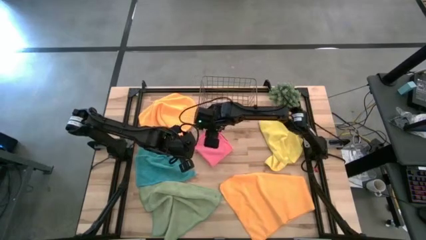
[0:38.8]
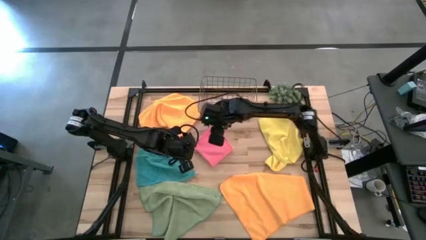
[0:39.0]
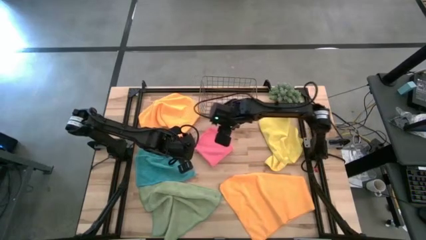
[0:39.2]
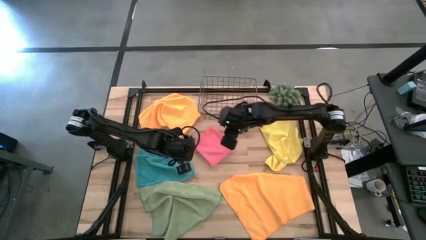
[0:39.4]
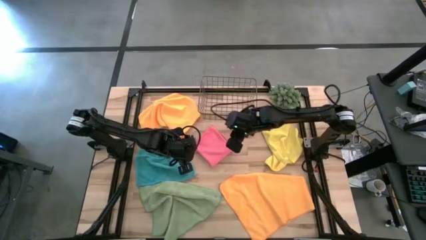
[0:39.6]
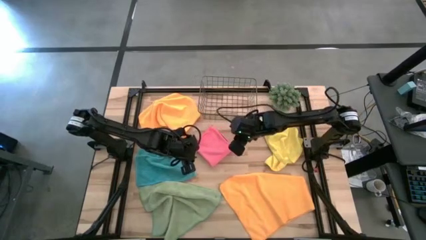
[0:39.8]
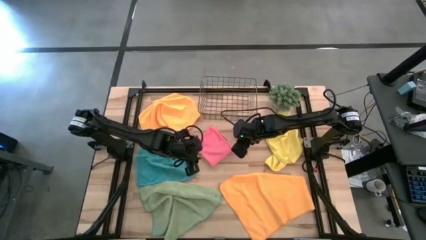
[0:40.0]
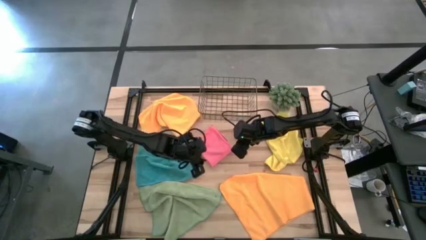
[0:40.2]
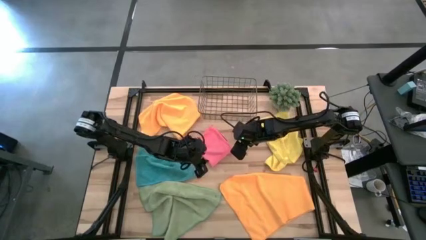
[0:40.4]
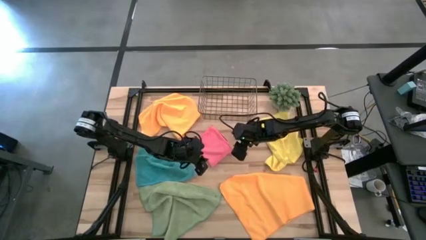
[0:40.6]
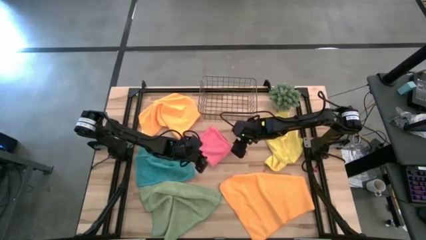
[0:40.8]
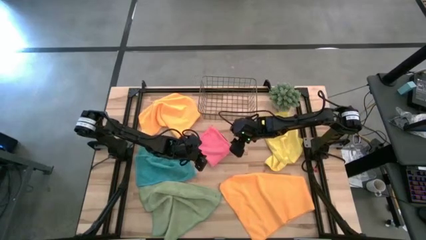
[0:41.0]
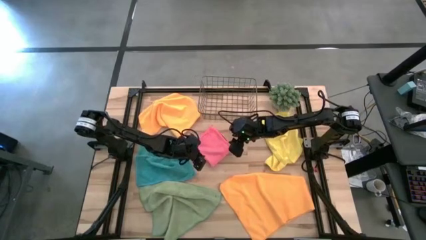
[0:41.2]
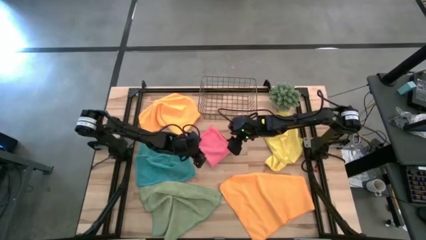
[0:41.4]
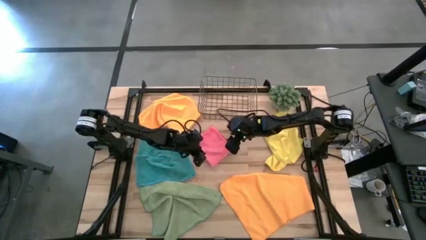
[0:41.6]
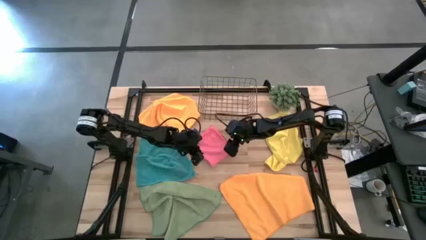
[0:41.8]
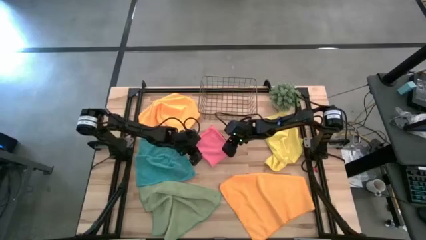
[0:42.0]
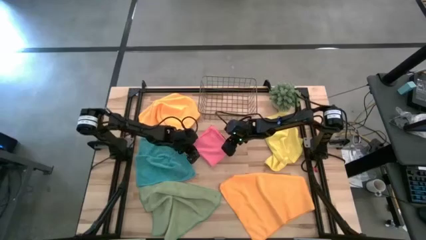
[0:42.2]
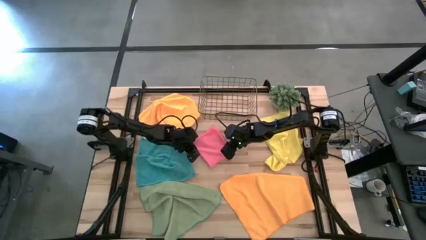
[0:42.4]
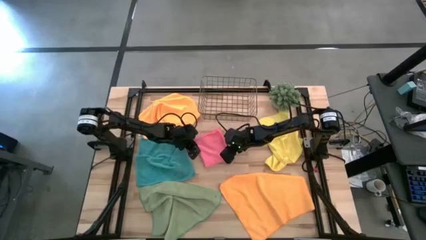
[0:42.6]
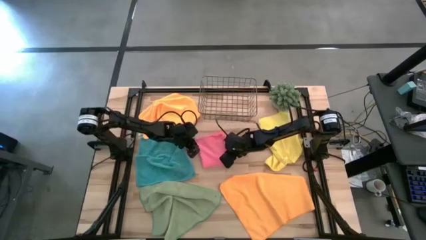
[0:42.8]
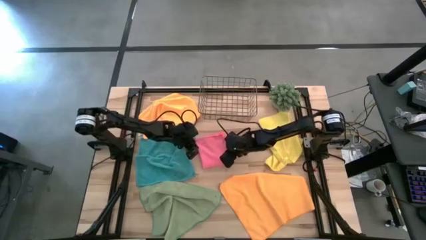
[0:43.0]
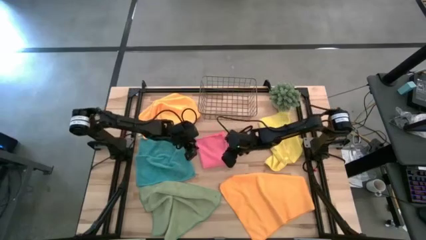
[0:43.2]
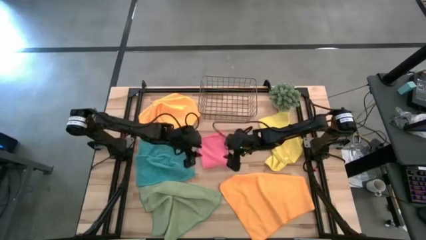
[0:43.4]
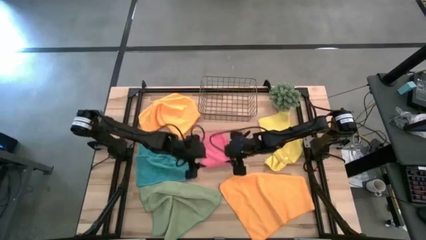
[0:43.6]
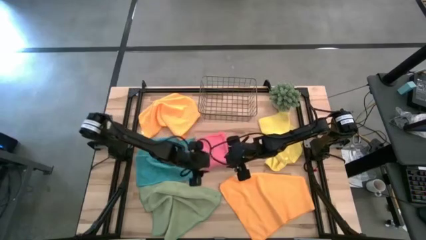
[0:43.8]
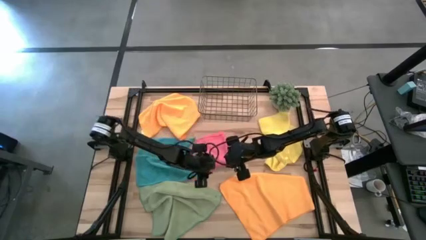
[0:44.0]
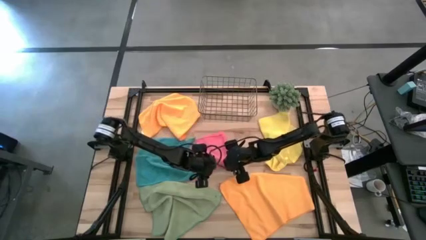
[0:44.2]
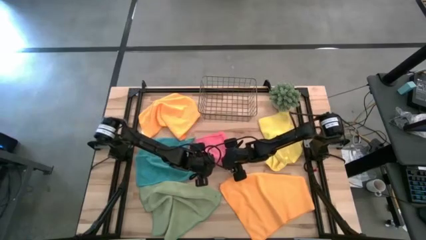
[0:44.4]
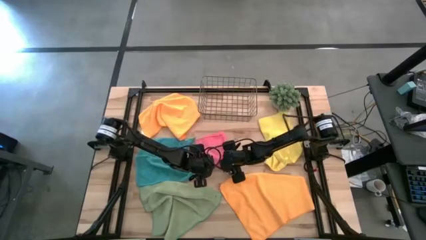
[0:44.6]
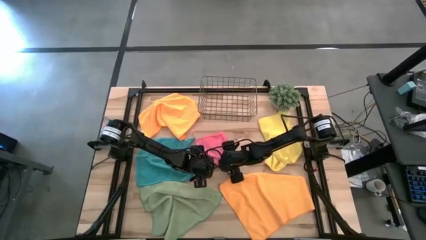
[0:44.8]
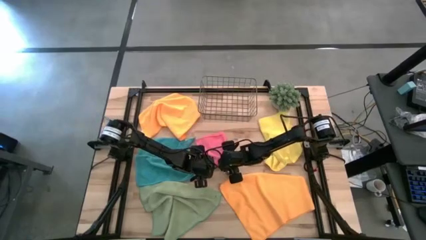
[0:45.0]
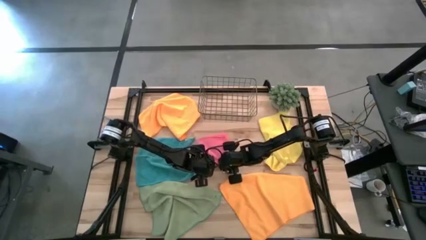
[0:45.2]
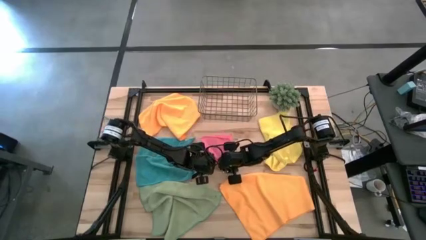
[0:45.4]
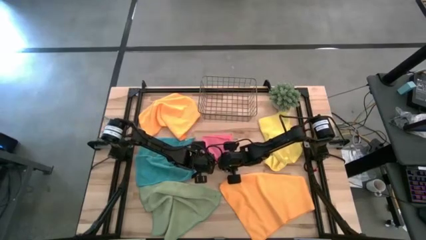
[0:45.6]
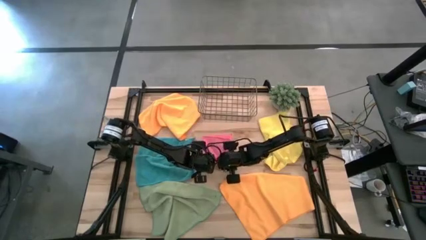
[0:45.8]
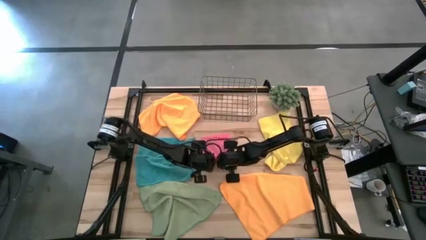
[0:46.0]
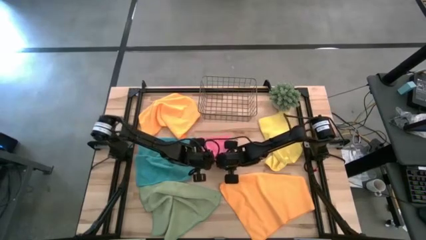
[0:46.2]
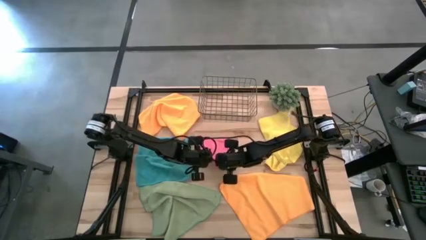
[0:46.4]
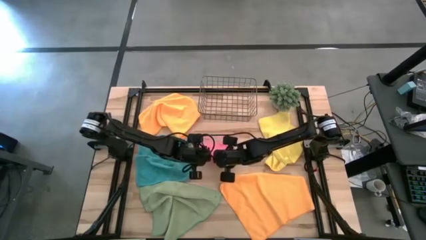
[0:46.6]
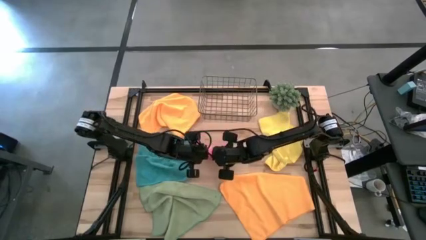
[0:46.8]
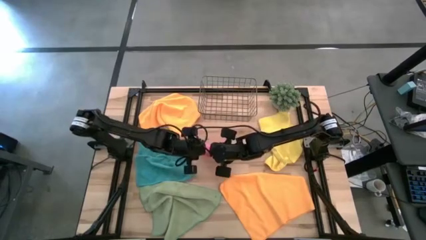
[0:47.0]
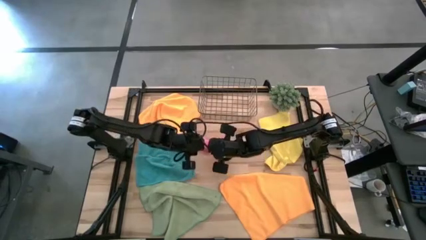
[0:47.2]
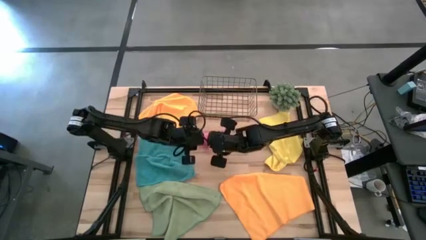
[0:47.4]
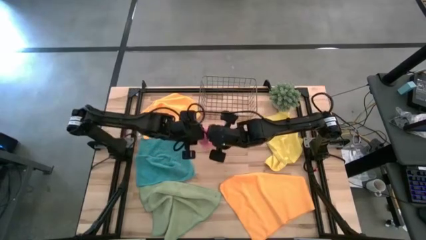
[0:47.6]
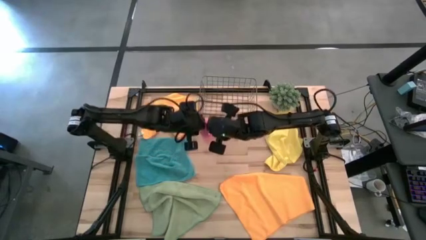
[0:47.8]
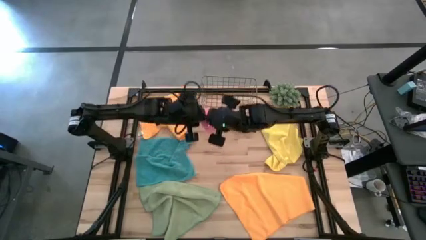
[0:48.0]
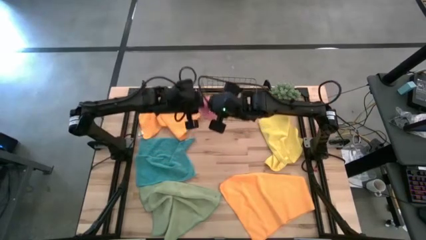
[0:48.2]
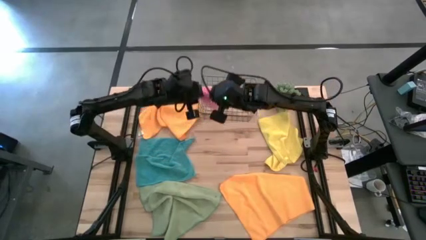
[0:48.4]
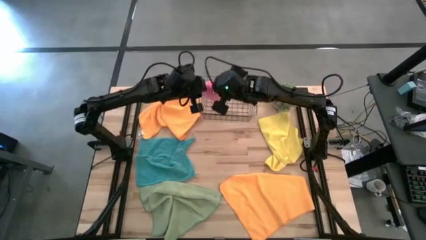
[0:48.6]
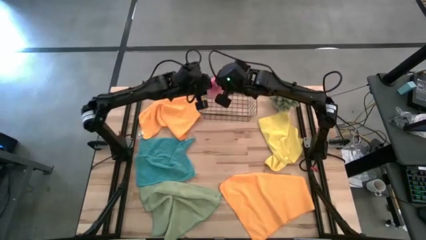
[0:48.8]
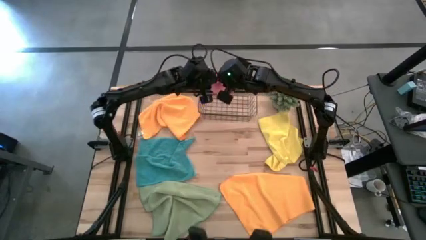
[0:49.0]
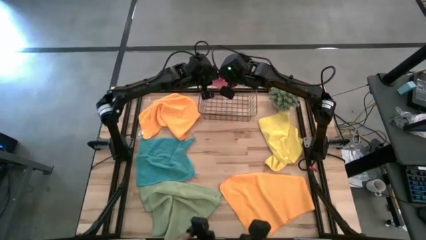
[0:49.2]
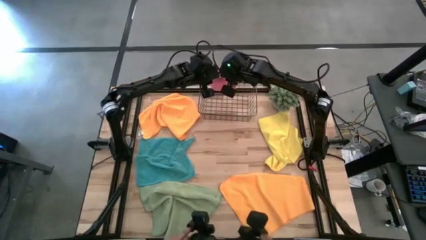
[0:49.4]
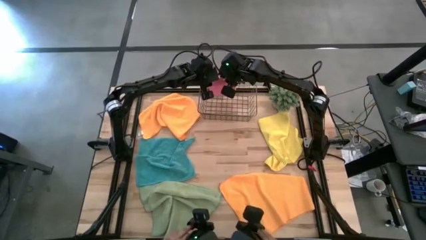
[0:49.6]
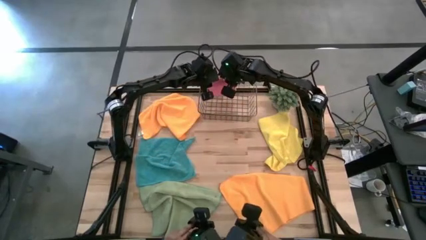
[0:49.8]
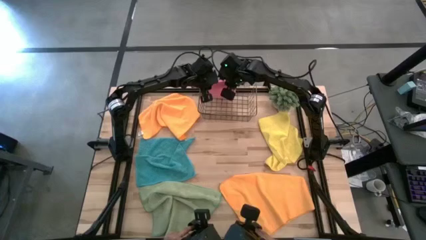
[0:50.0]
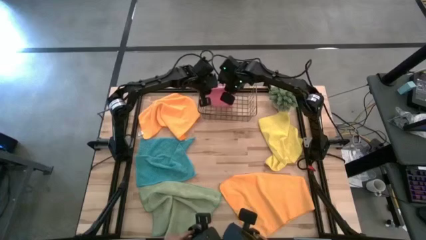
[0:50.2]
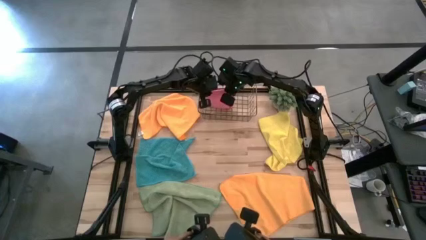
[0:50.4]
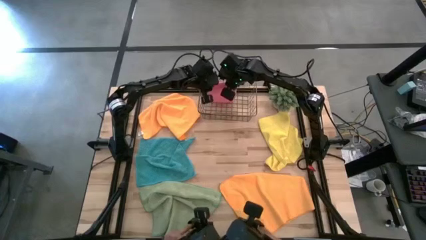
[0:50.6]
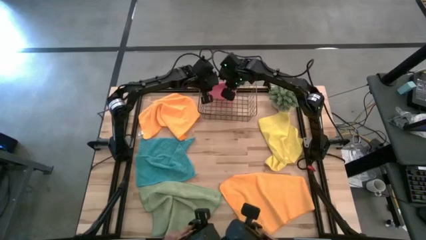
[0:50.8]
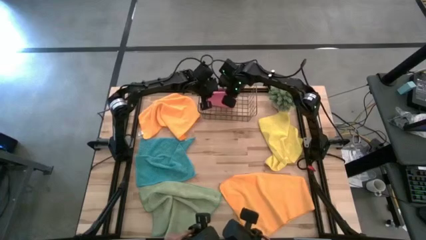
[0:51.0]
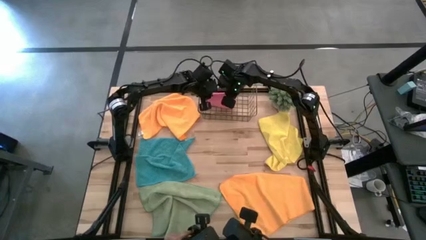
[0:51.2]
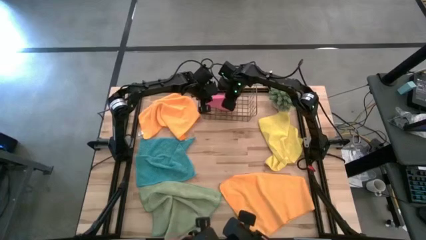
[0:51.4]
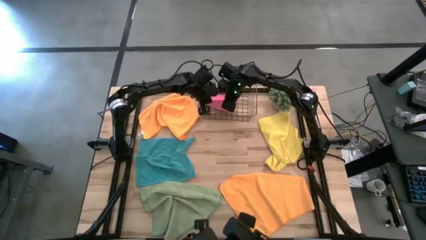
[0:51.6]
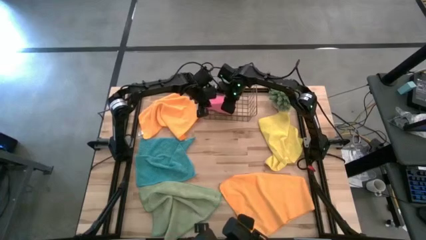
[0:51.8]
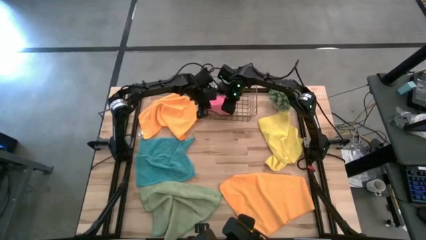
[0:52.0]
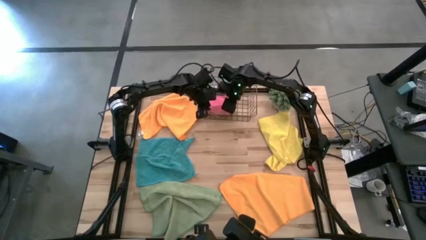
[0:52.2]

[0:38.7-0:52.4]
Task: Fold microfiber towels
Put the folded pink microfiber cloth into the gold wire basket

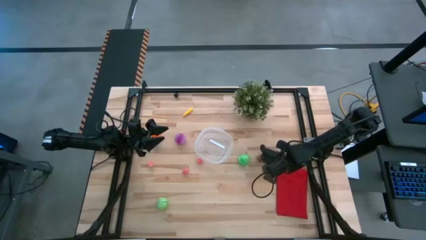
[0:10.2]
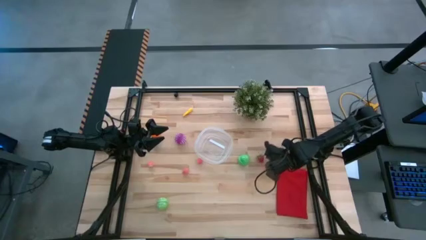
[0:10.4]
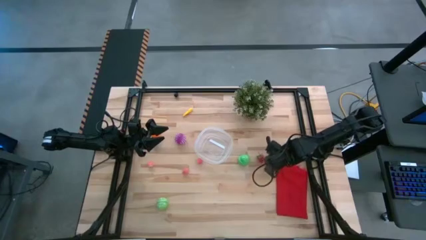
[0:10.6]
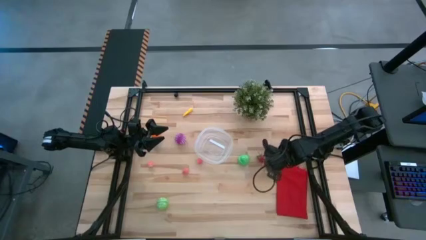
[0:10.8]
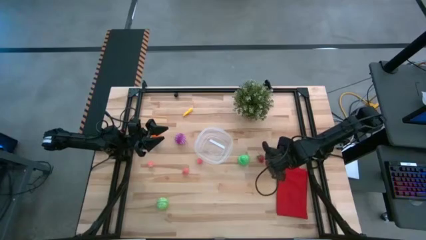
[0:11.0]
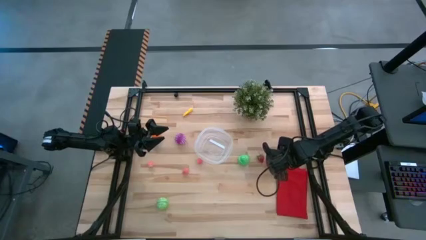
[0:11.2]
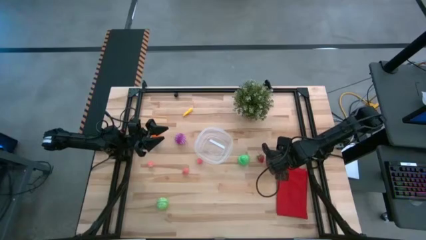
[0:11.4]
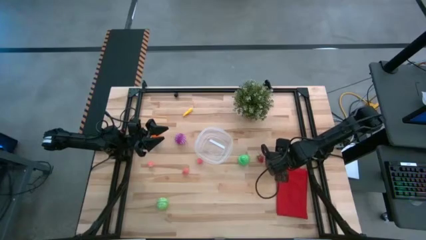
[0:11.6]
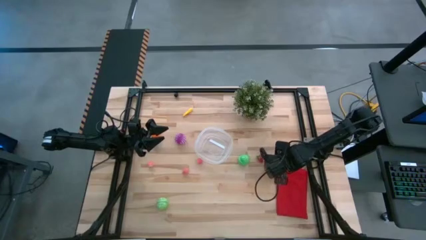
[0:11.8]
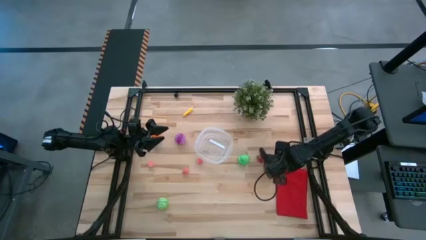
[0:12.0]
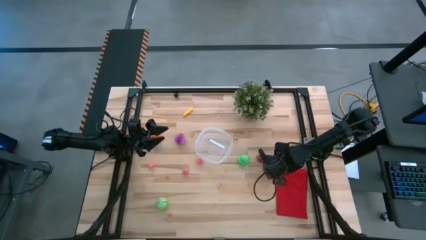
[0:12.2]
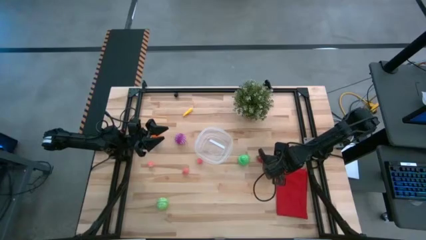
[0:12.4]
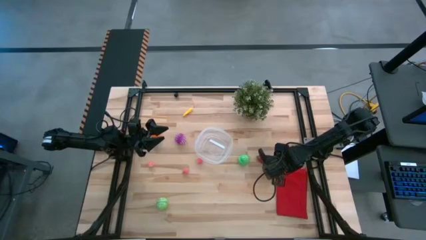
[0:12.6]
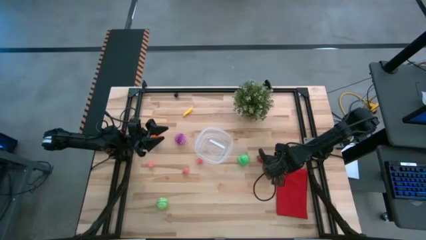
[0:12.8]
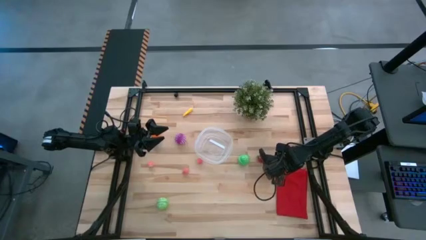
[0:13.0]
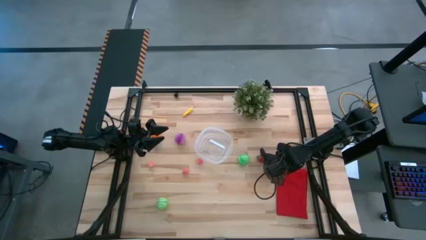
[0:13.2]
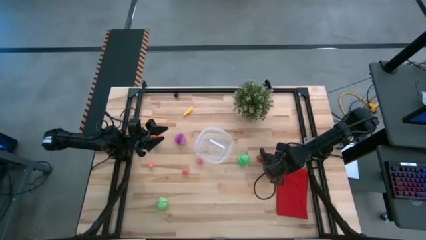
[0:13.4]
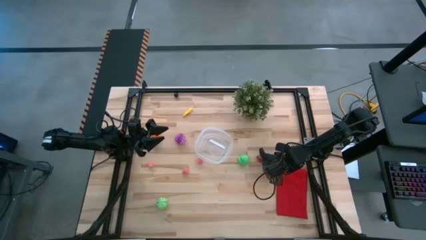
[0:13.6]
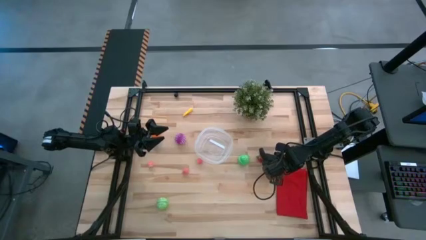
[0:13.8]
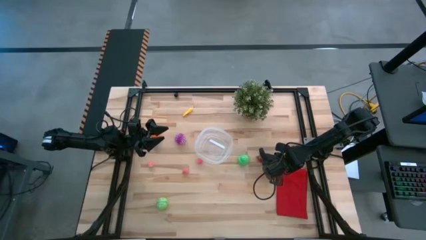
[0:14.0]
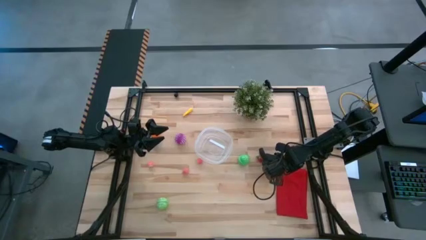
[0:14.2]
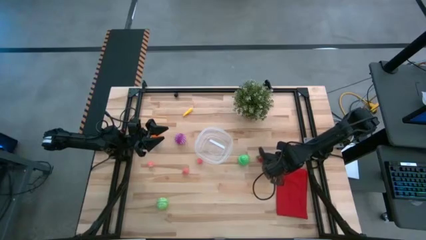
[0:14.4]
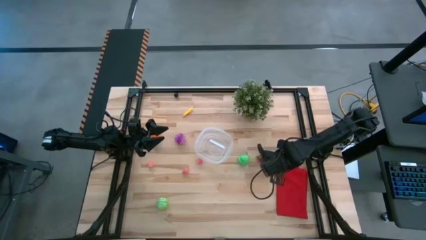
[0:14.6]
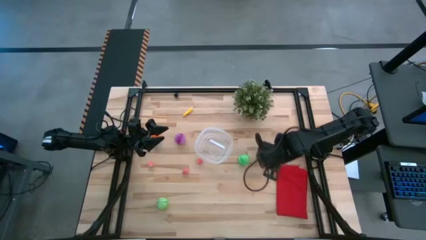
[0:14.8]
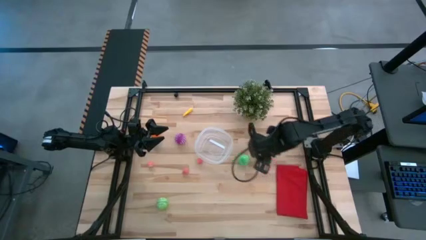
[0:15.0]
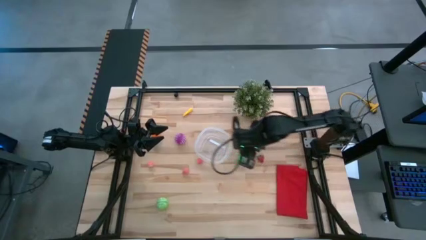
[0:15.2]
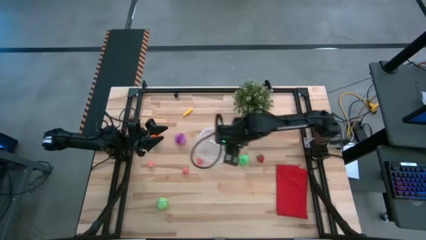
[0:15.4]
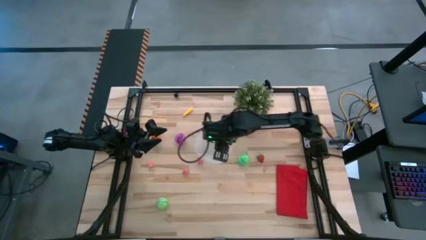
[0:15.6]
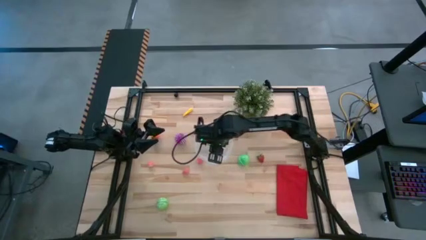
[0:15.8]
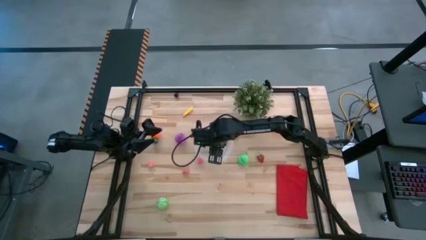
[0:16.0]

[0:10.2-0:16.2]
Task: Pick and placing Produce into tupperware
Put the right red strawberry into the transparent bin
